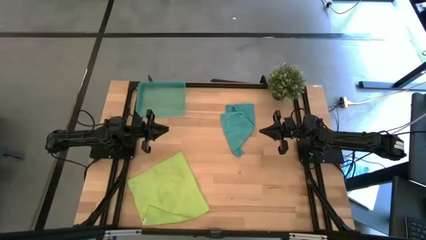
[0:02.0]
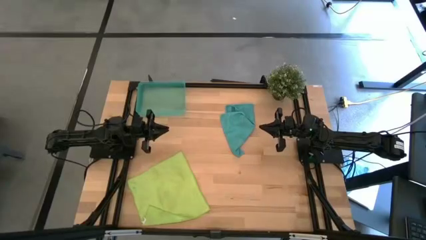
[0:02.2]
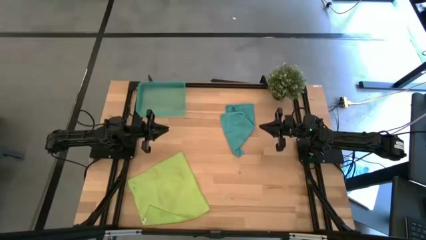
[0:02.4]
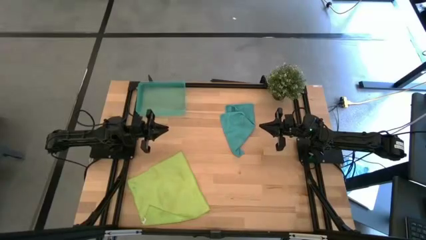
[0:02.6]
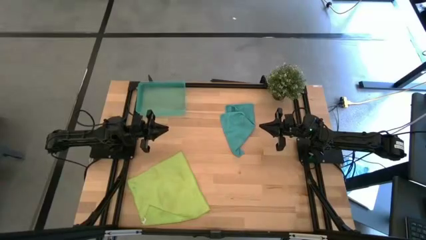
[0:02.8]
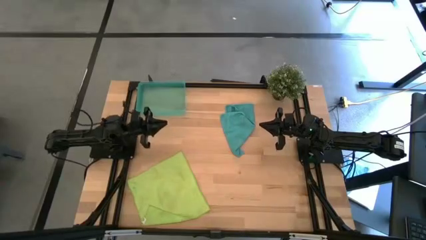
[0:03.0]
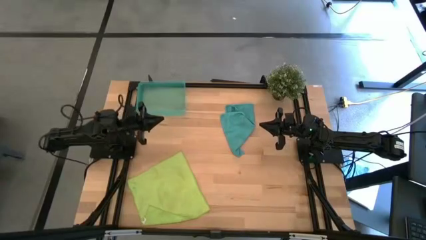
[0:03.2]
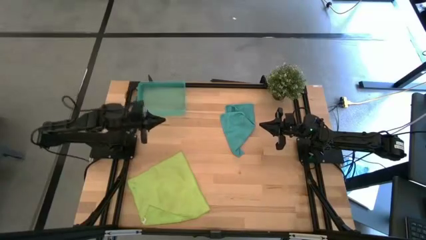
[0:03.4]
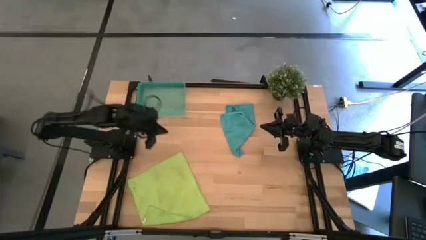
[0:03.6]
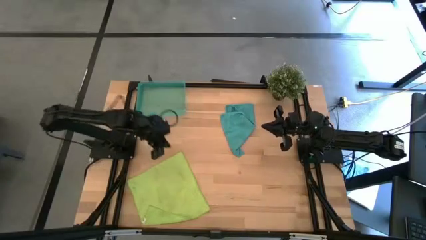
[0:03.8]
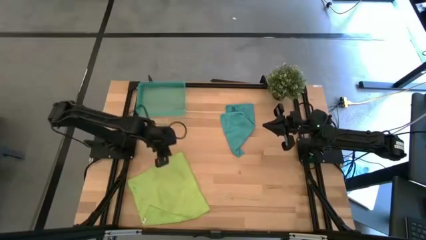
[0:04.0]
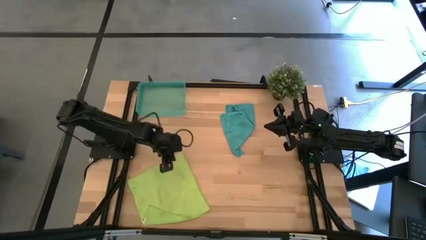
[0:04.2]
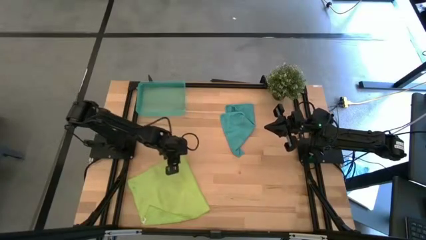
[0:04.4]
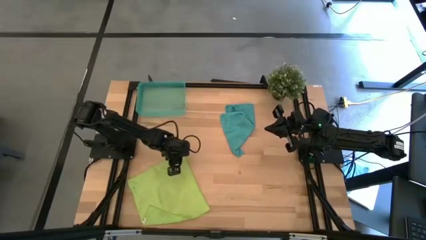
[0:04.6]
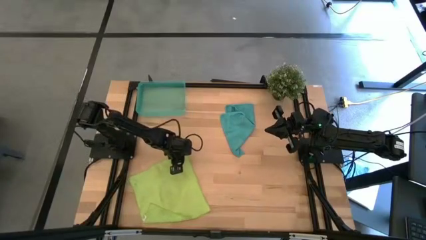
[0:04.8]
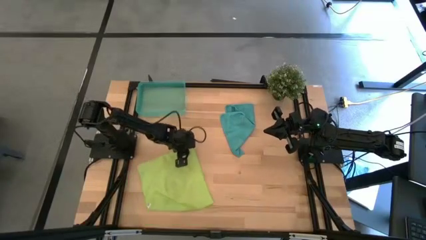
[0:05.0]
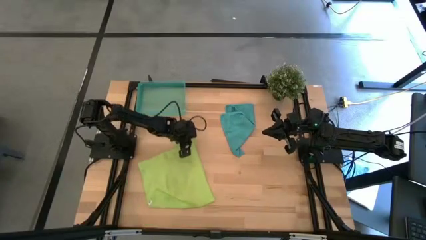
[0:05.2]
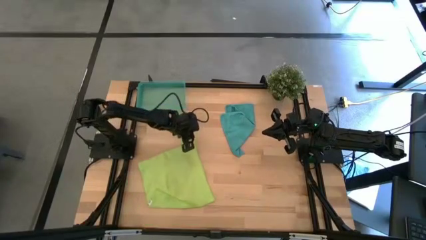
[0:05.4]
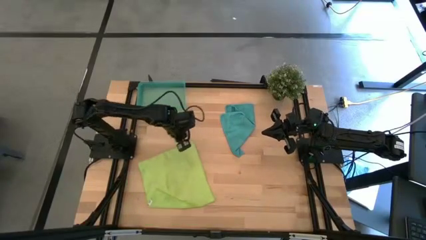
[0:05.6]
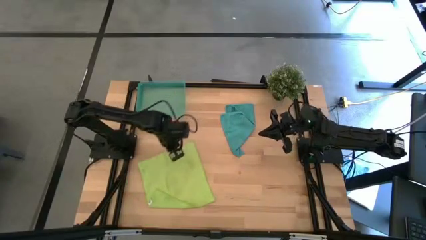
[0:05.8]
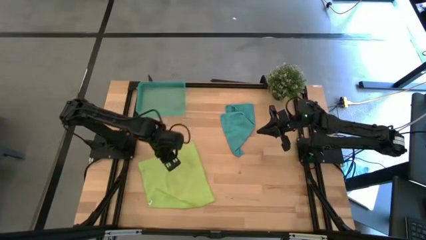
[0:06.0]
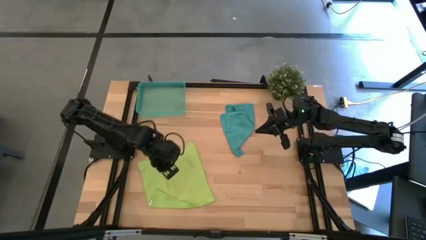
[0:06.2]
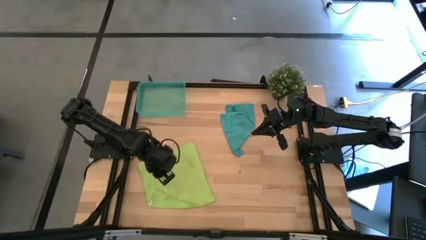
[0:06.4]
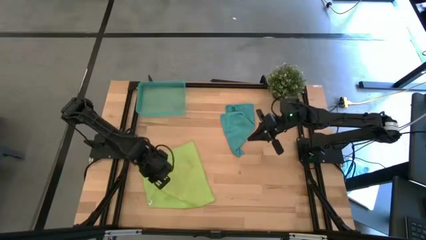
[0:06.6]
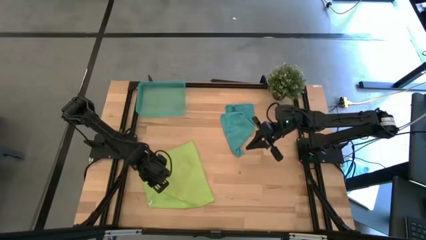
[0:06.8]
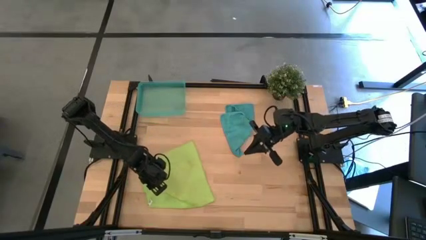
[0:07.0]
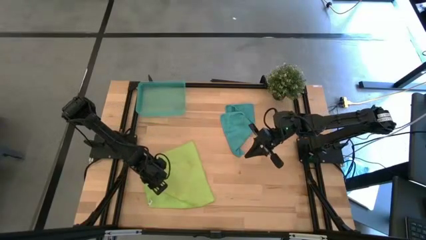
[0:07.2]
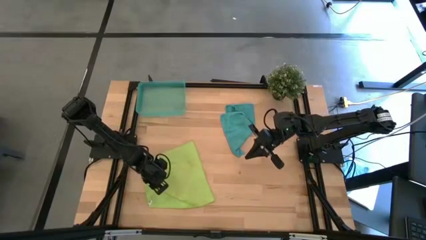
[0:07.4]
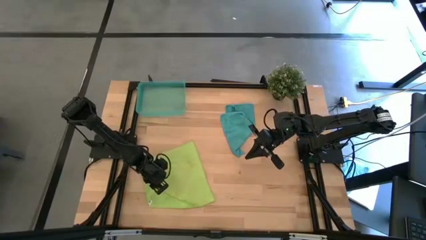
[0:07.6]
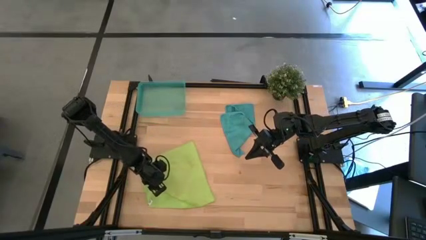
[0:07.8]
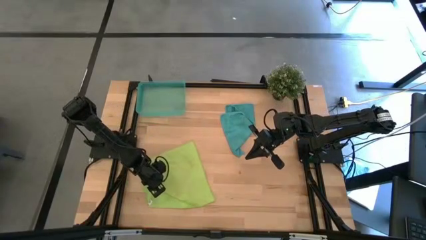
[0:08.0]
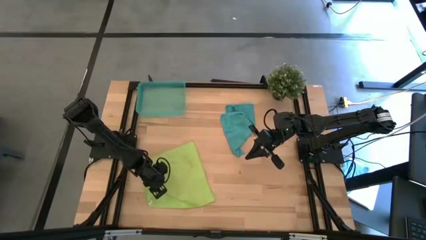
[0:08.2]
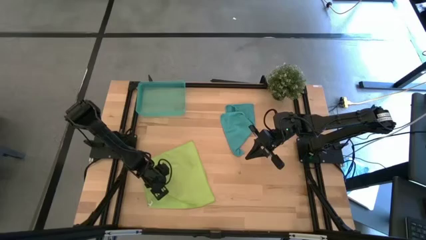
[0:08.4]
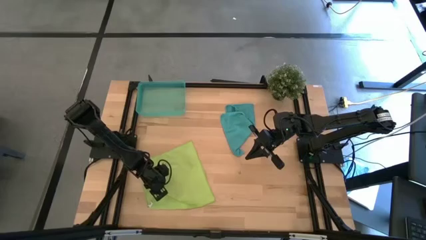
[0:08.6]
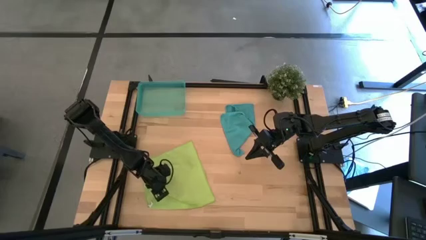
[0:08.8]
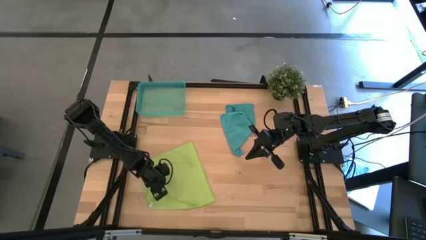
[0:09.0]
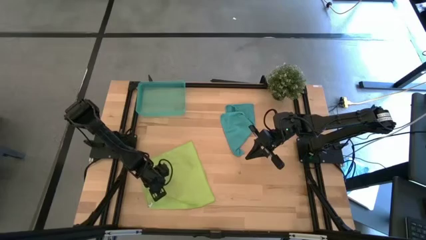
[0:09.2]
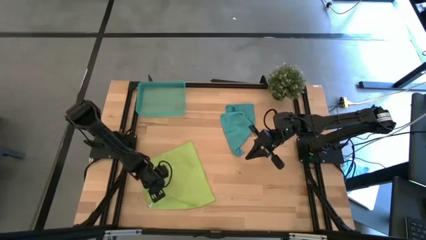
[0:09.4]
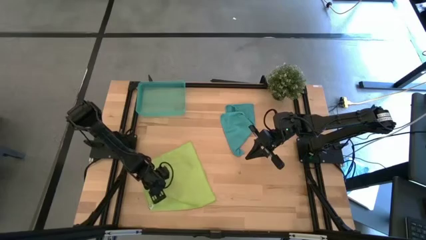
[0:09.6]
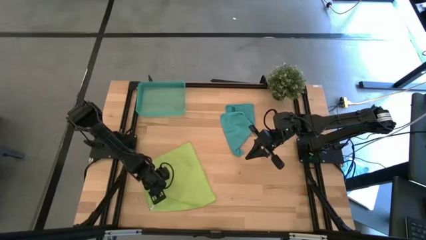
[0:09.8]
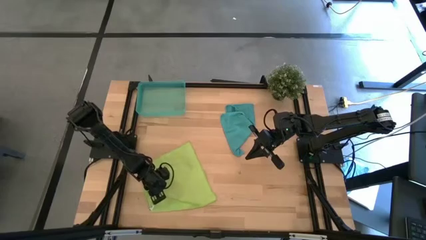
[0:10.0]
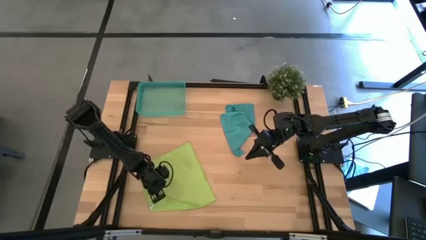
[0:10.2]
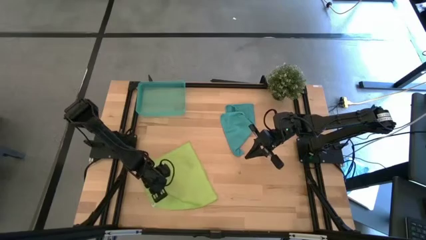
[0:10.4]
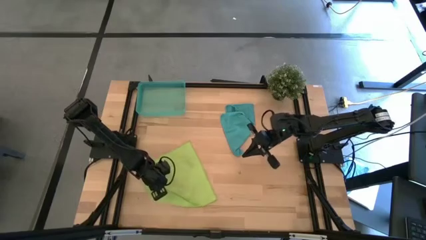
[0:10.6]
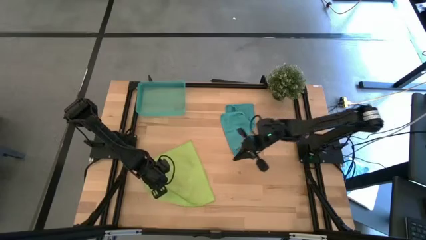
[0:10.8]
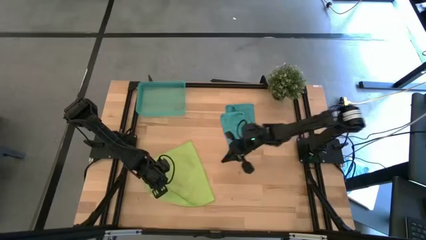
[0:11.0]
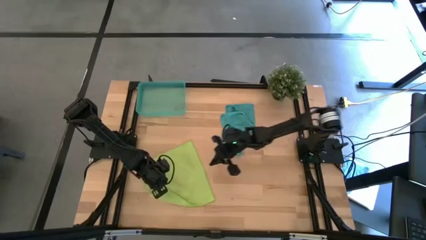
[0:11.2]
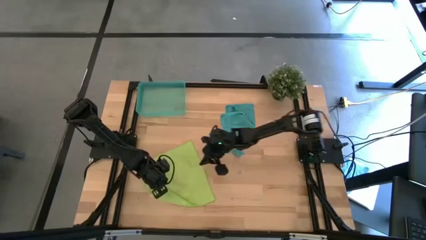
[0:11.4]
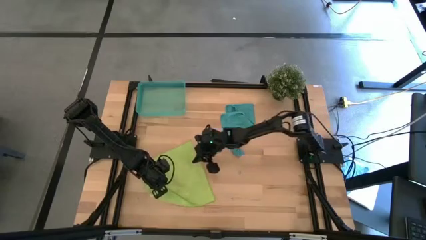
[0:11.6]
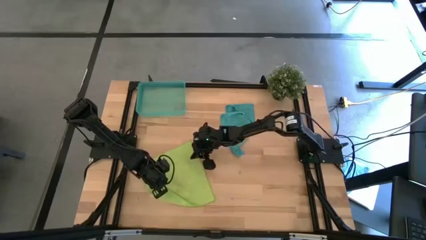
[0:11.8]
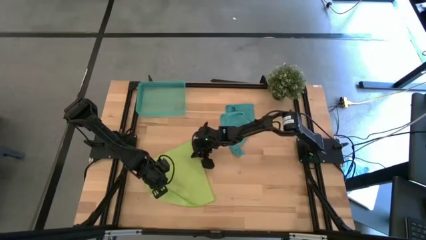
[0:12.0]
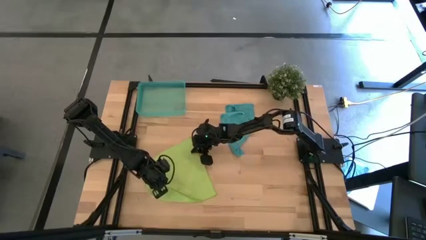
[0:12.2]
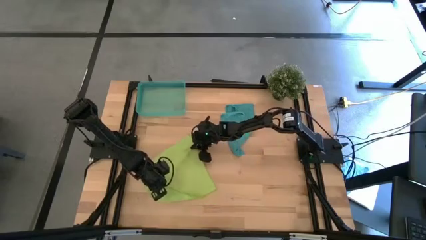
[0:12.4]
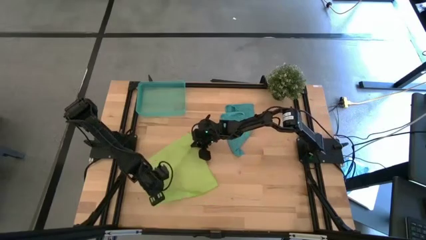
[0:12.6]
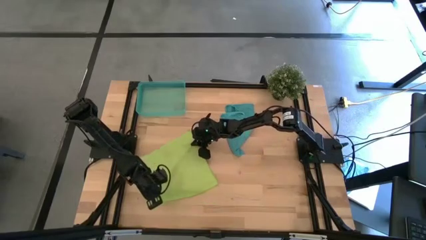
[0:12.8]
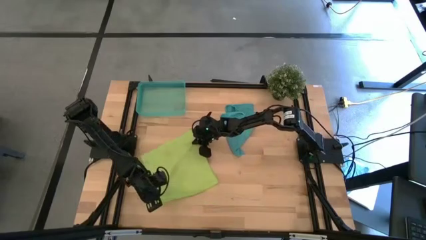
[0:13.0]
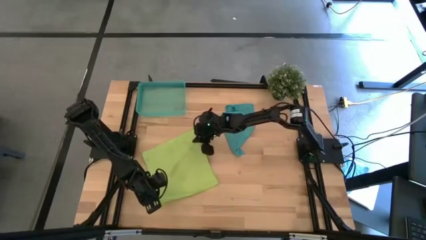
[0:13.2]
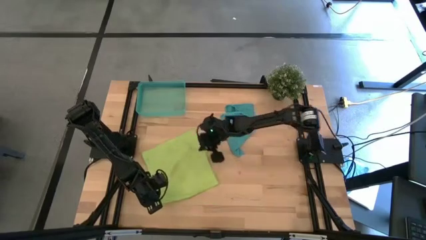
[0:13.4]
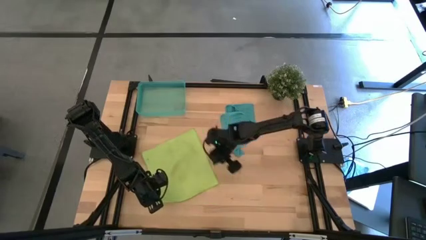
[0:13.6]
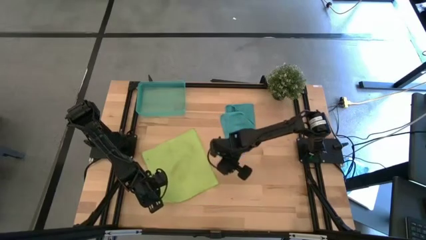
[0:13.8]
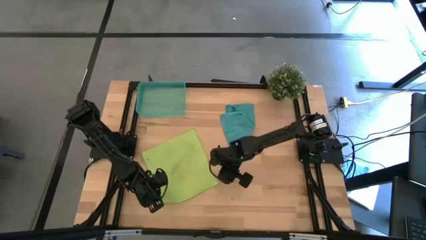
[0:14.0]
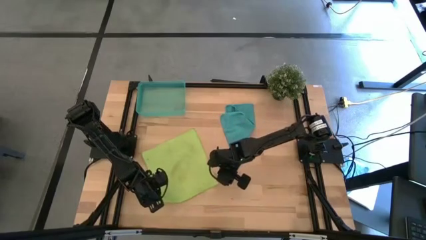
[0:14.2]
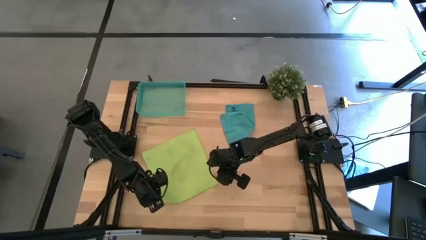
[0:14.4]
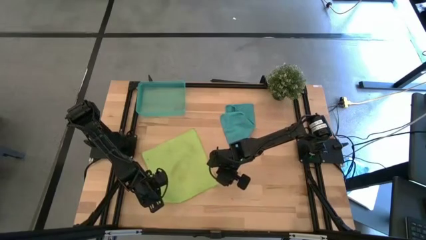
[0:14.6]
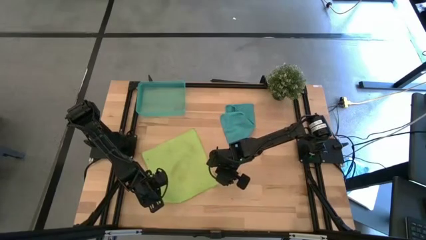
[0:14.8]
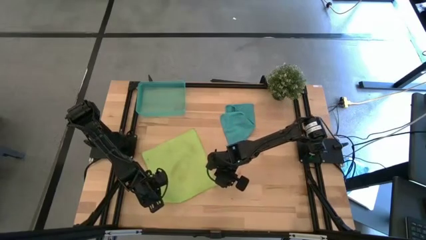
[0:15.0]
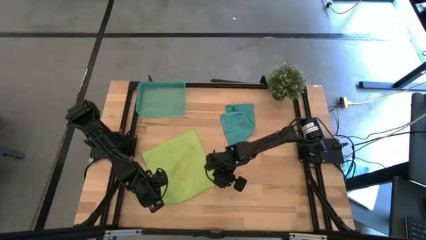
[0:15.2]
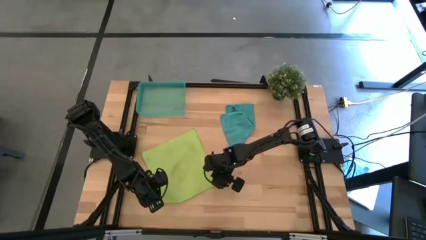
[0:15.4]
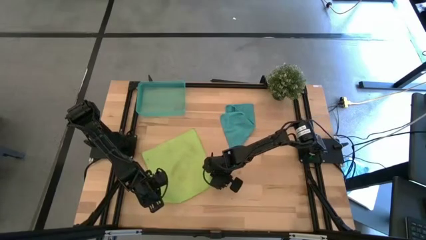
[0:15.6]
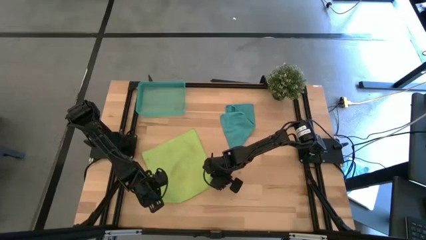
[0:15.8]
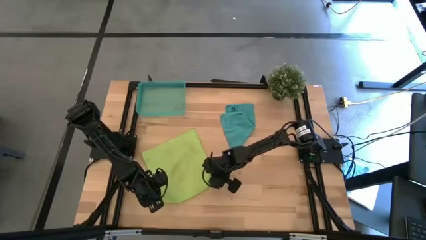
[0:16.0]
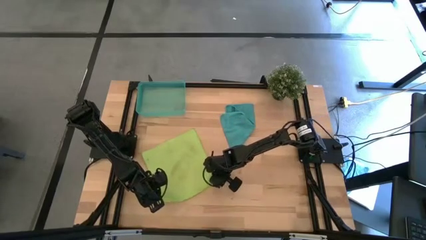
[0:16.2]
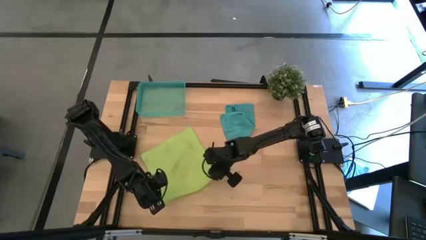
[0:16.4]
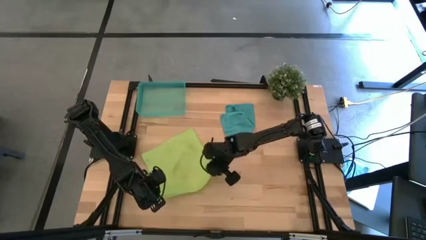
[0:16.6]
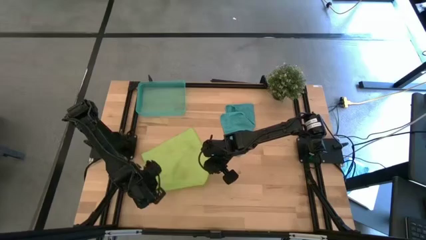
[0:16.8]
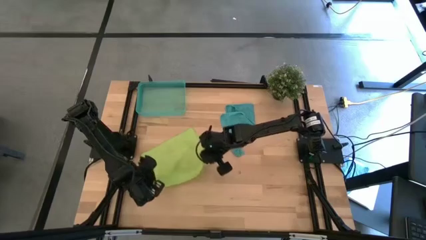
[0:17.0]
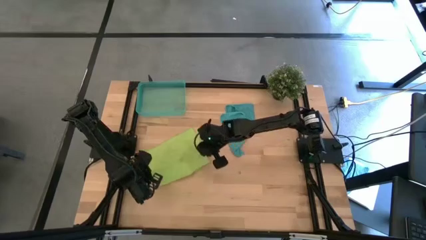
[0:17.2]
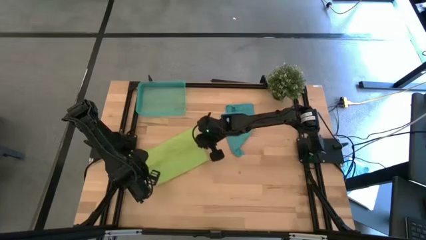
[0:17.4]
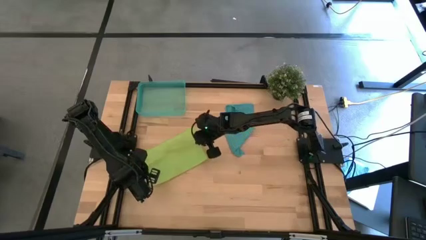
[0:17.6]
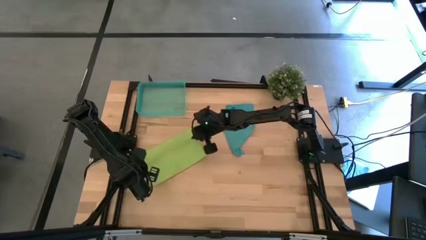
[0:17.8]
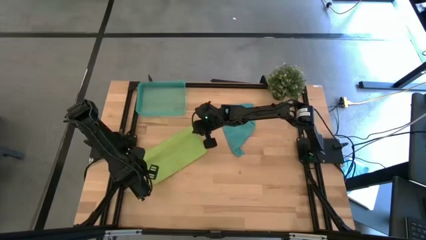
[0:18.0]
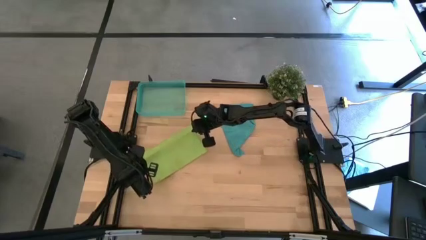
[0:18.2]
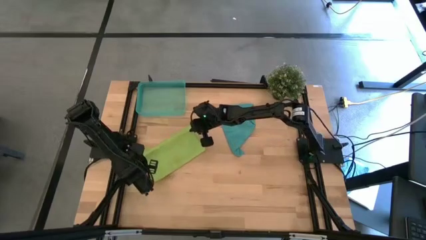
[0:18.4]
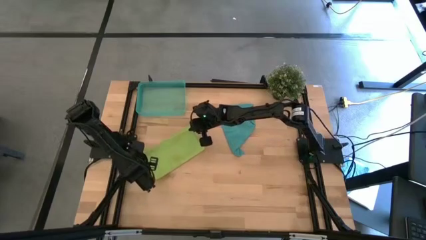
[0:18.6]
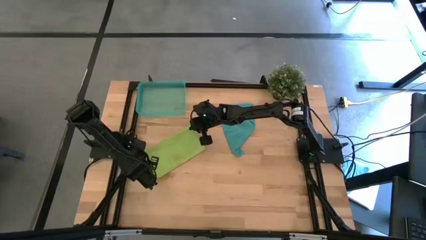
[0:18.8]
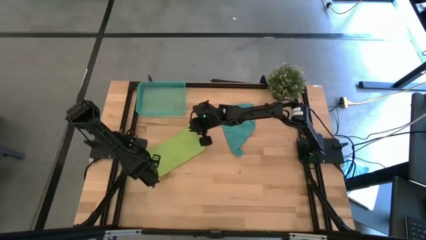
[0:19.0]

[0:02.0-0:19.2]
Task: Roll microfiber towels into tight, uniform cylinder then place into a basket
Roll the green microfiber cloth
